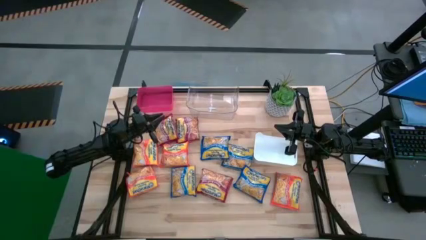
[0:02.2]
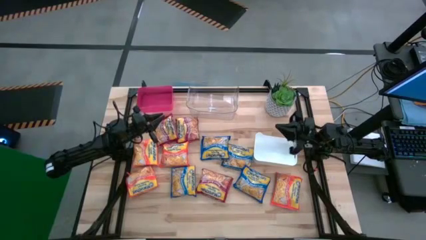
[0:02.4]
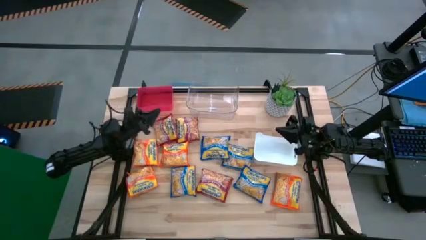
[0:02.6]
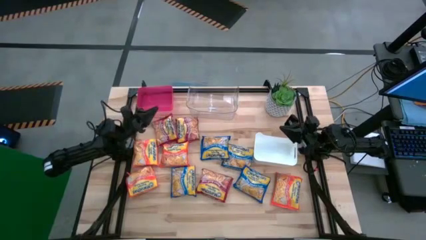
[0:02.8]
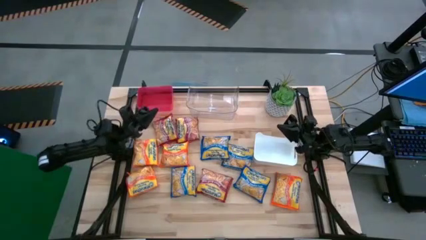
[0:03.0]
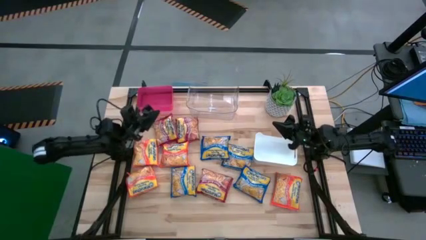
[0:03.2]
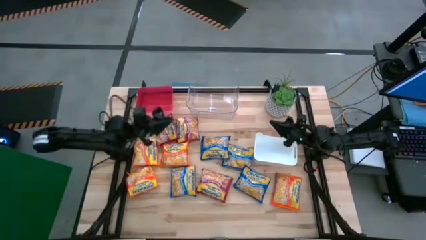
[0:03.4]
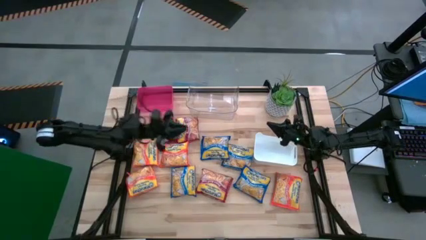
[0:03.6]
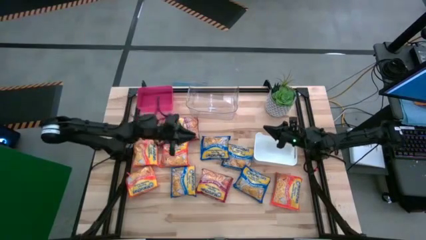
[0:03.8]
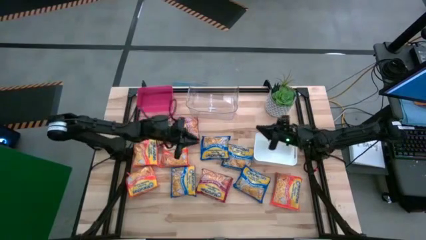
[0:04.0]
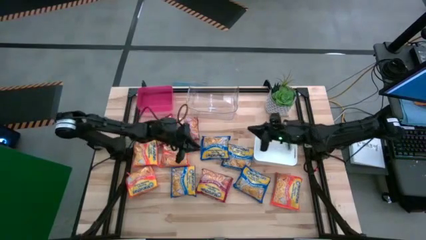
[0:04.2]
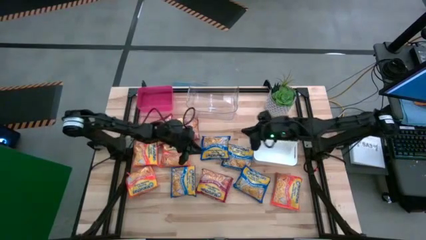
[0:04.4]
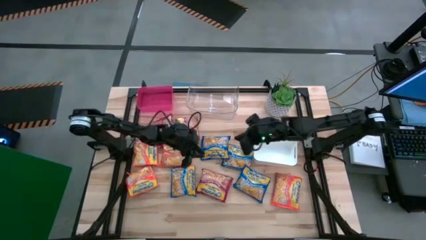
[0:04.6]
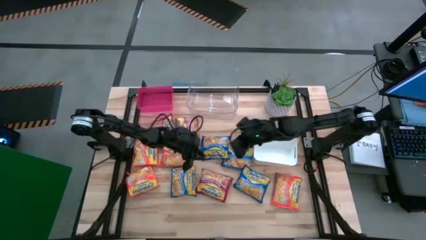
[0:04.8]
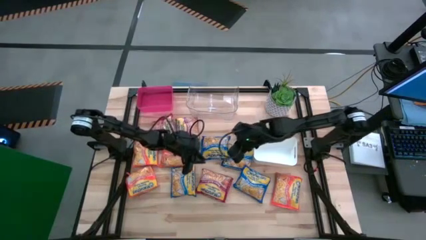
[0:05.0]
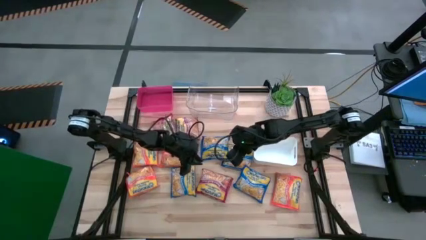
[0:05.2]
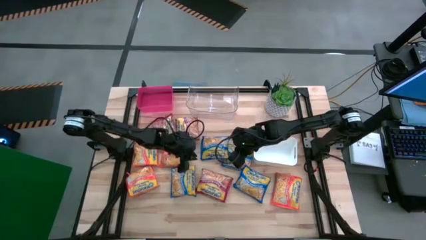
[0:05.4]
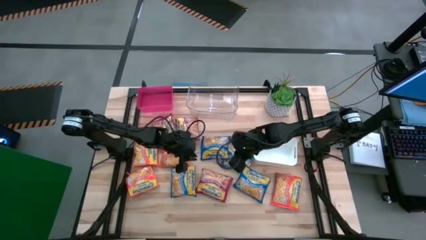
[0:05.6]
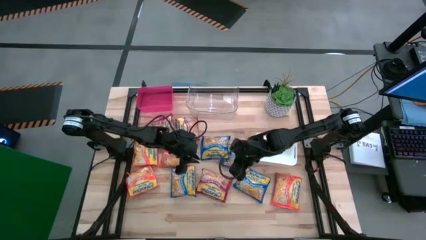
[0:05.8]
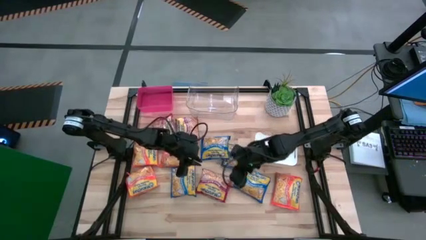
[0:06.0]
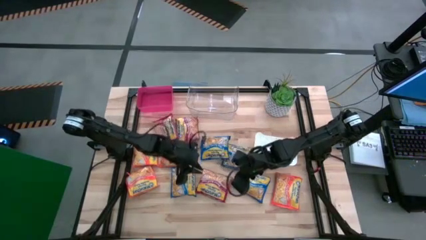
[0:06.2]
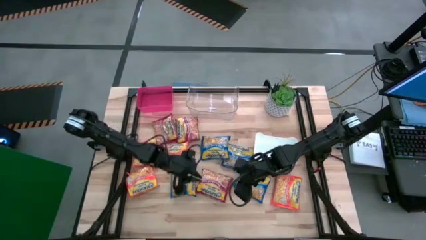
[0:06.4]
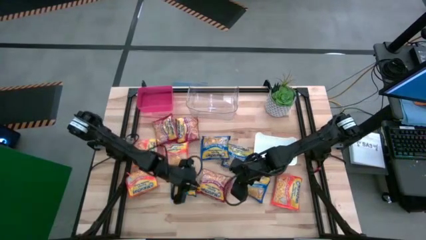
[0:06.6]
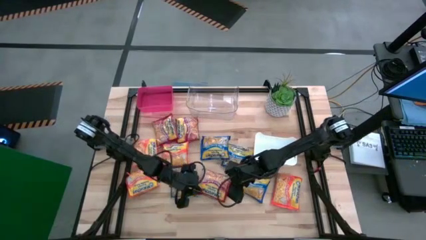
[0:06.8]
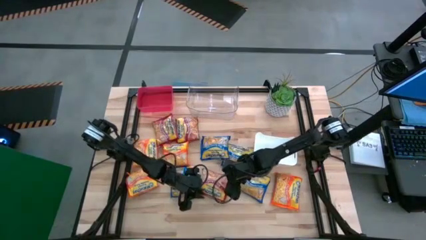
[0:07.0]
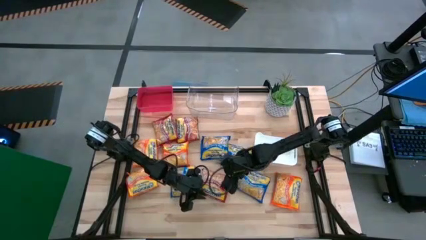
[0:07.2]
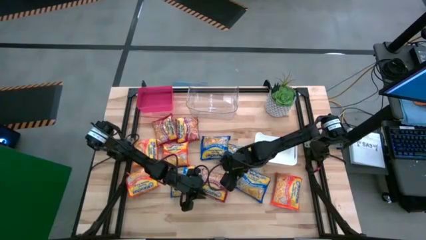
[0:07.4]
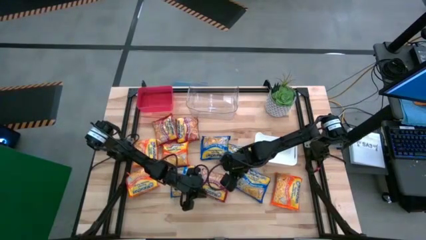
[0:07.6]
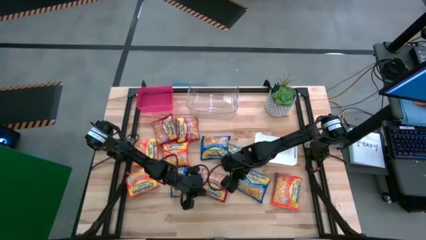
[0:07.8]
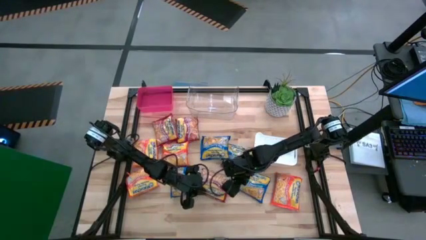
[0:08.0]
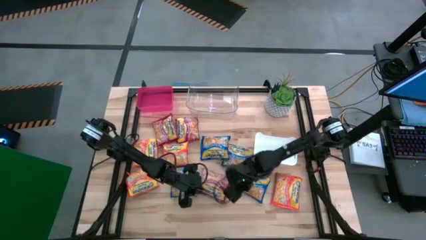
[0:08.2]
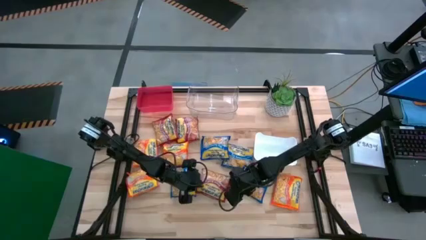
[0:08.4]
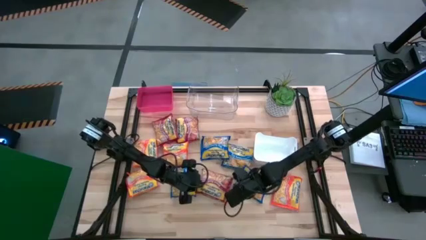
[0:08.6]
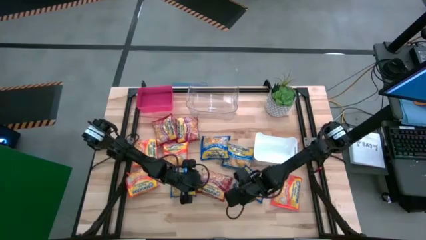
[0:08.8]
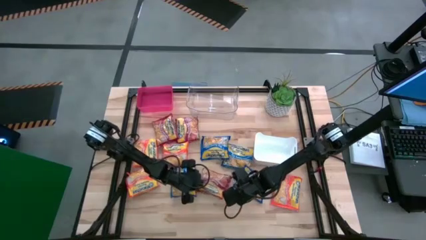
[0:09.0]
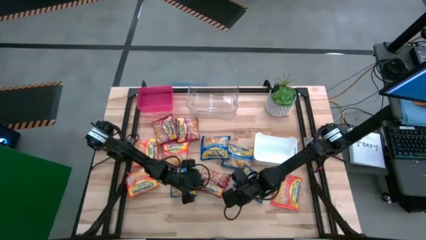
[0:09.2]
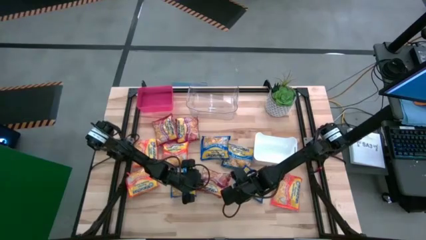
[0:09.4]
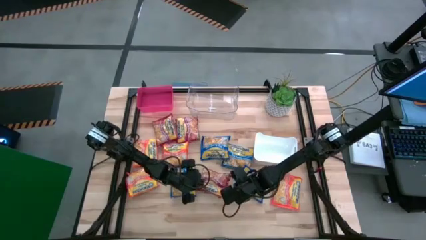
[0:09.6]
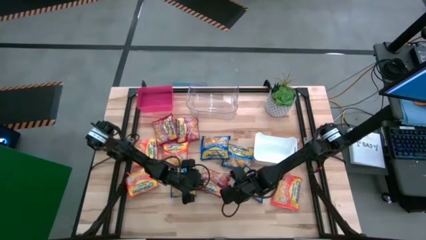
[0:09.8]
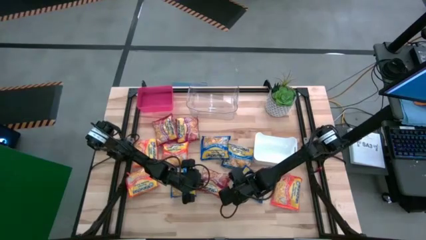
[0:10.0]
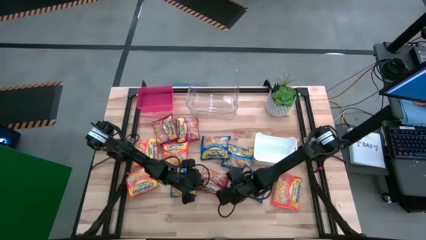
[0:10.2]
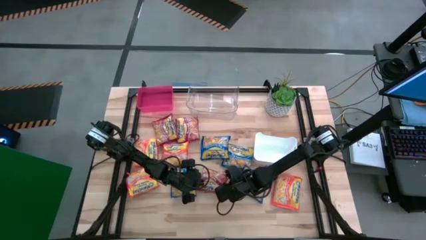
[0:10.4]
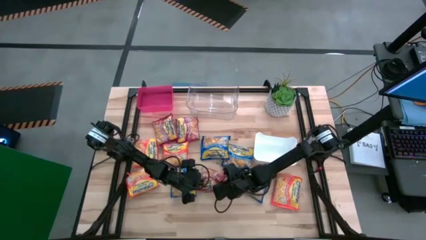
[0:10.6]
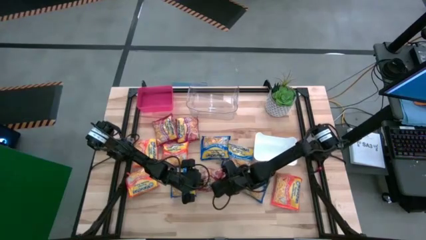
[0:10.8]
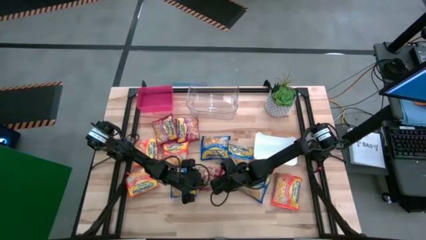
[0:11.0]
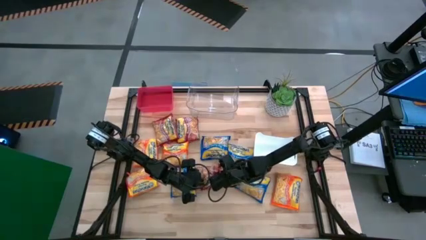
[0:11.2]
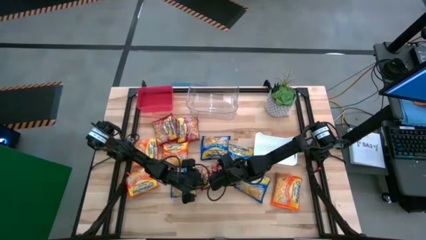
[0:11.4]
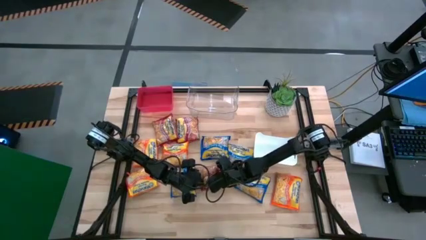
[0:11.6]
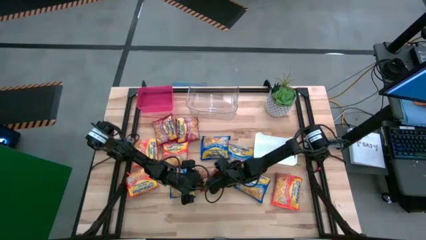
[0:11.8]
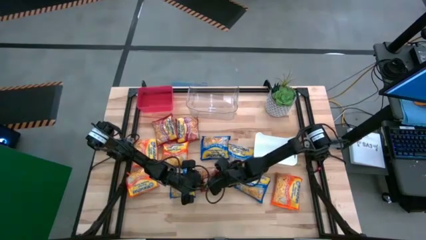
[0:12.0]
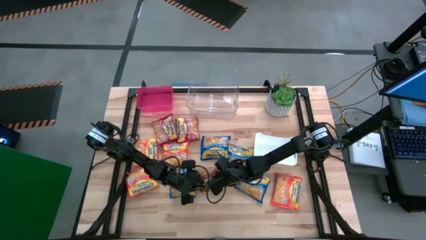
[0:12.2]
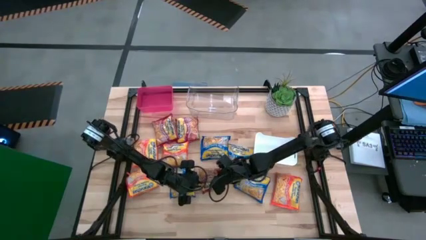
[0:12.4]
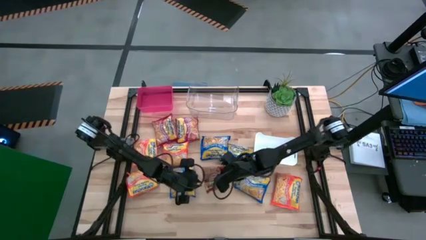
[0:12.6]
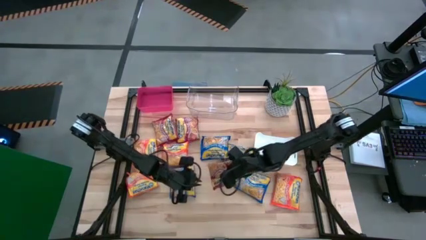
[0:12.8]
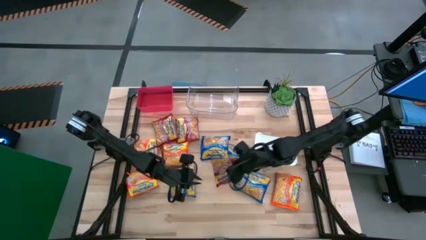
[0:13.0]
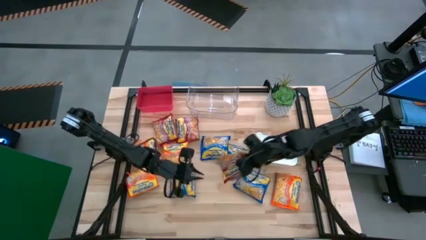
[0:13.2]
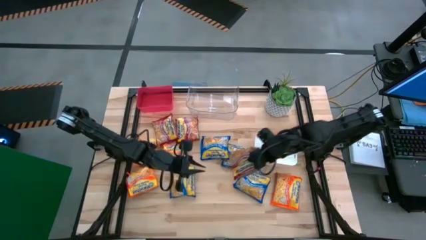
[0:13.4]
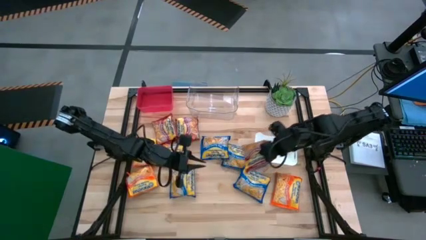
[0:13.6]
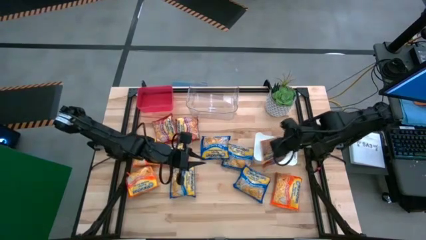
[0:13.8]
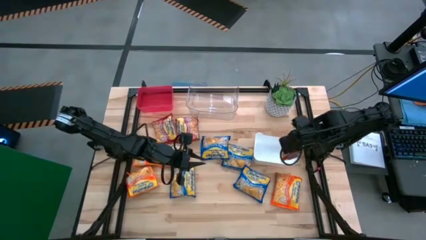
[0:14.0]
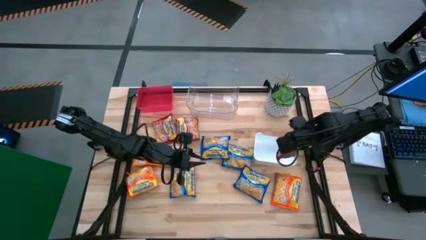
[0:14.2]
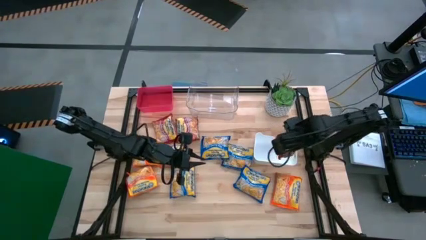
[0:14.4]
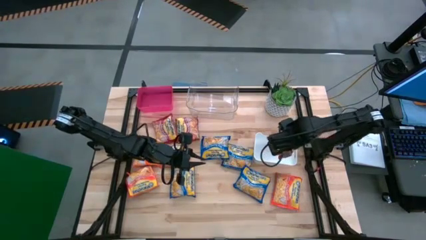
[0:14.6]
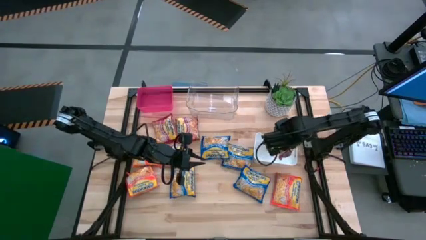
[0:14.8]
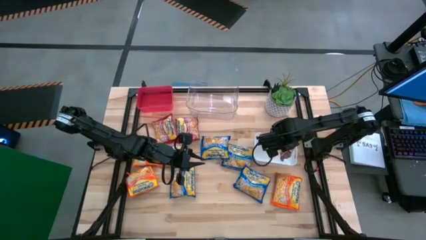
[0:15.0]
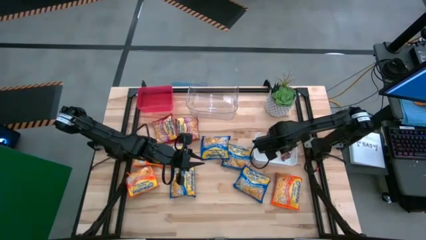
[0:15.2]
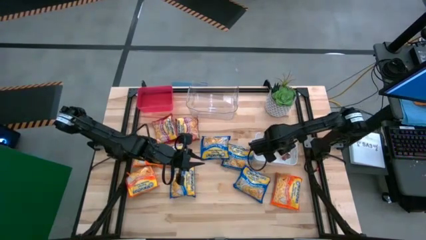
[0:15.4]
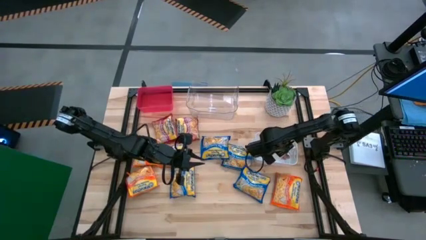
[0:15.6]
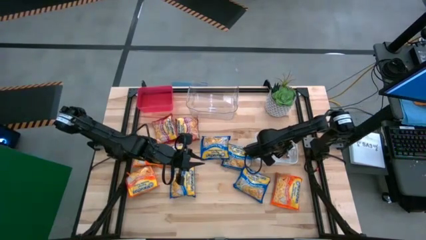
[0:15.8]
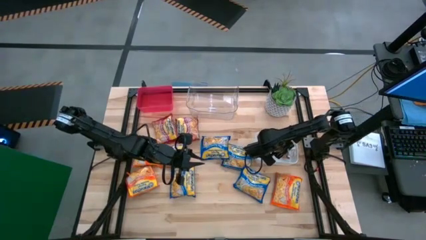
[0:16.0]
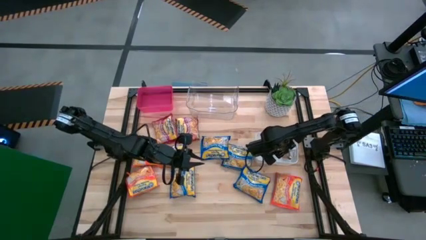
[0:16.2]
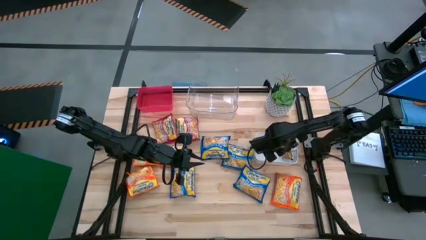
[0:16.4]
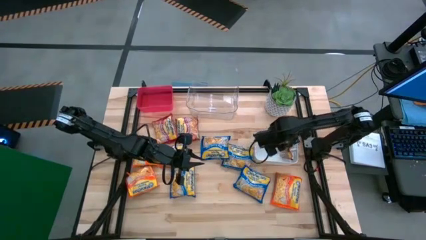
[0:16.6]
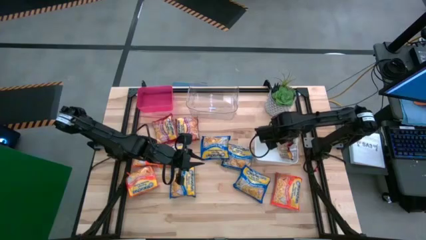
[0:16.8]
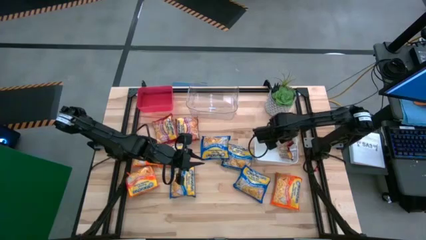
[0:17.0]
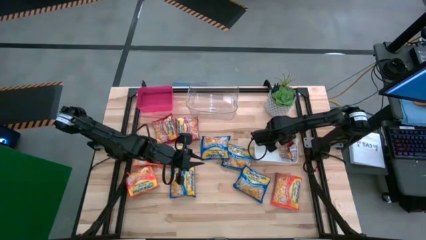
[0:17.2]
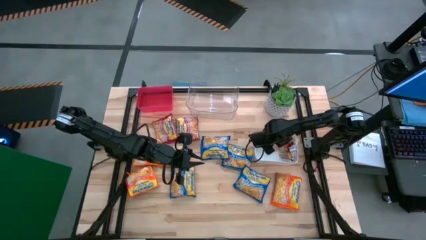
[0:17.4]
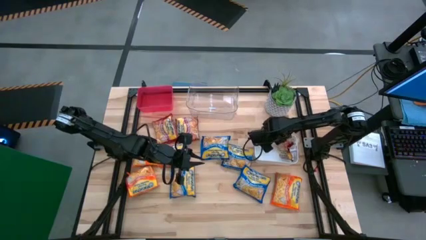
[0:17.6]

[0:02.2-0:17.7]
Task: Sort Maruchan noodles
Put the red noodle pack into the white bin
